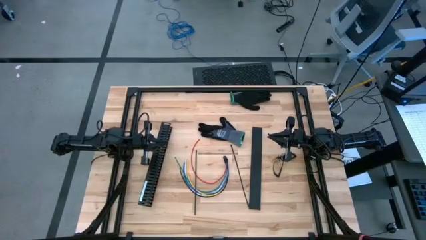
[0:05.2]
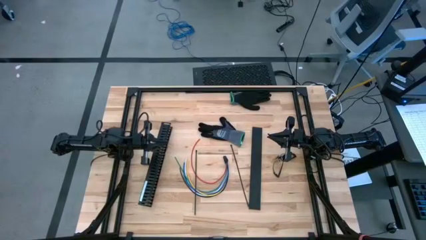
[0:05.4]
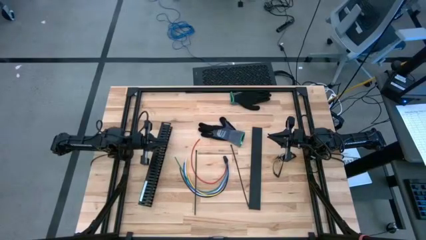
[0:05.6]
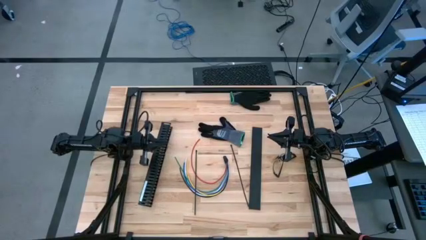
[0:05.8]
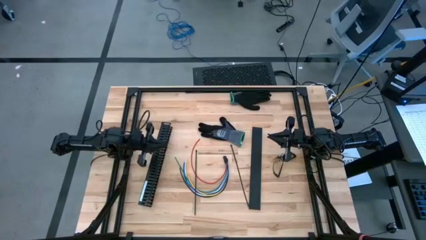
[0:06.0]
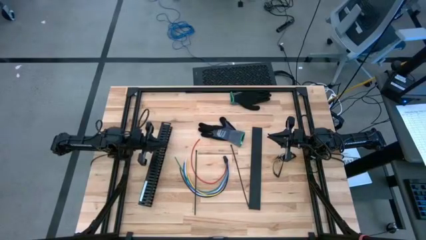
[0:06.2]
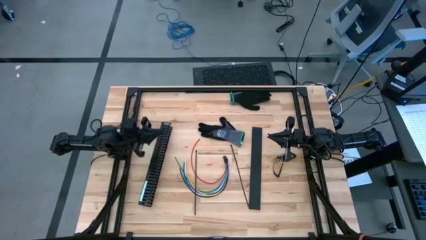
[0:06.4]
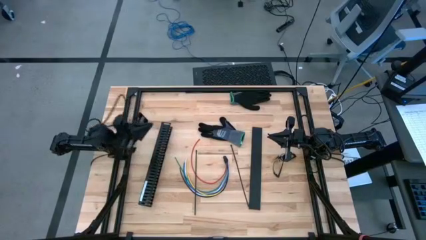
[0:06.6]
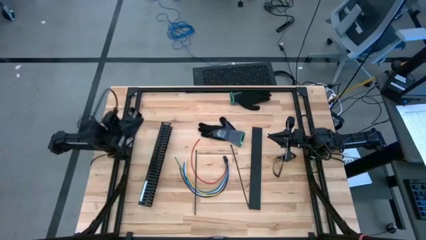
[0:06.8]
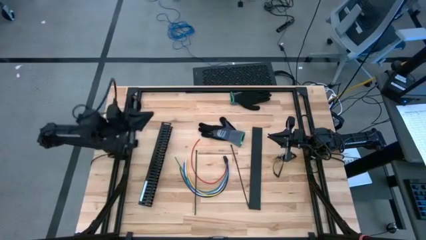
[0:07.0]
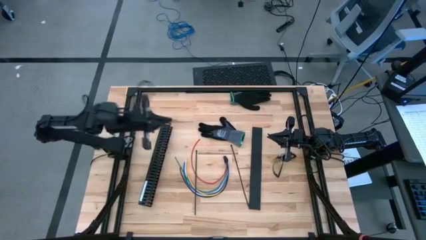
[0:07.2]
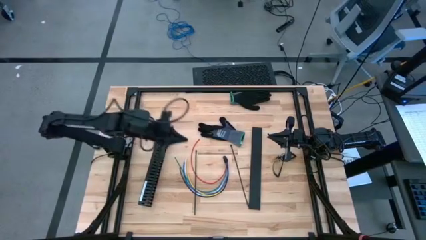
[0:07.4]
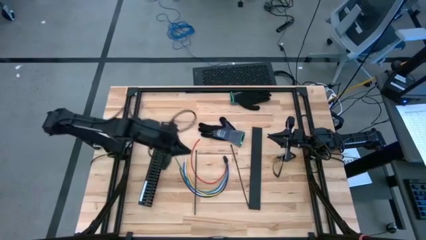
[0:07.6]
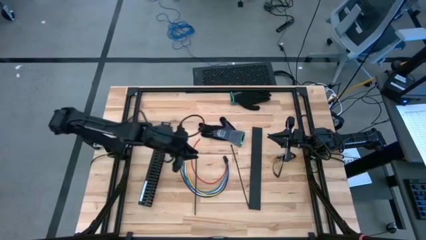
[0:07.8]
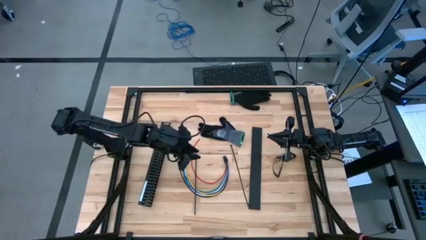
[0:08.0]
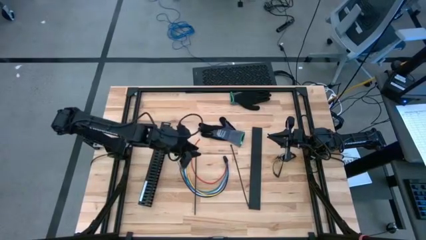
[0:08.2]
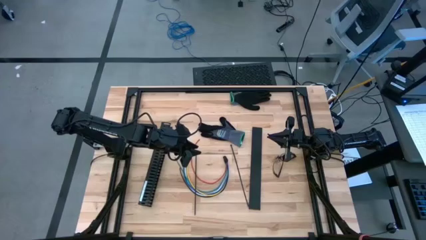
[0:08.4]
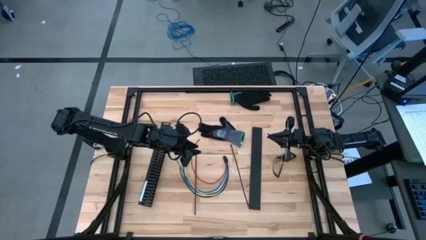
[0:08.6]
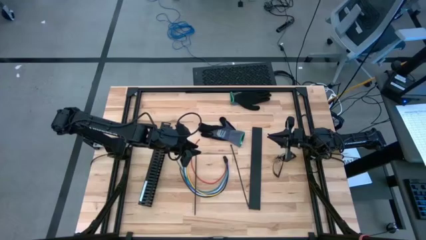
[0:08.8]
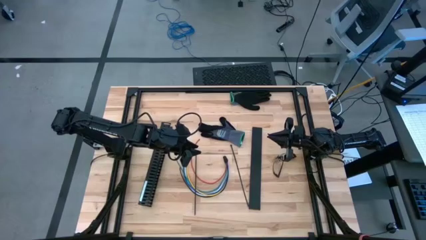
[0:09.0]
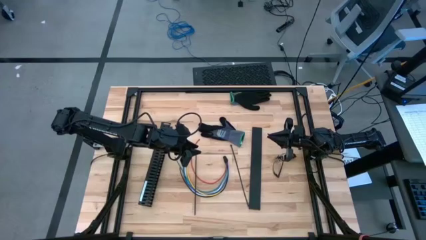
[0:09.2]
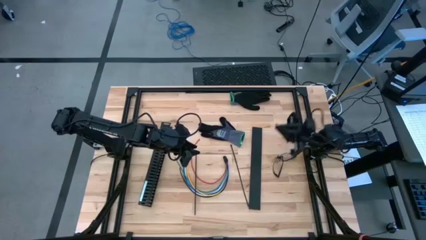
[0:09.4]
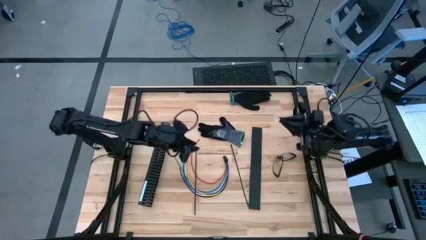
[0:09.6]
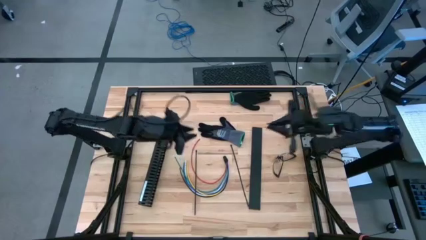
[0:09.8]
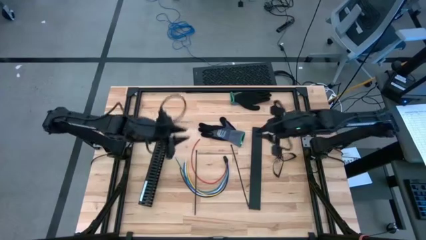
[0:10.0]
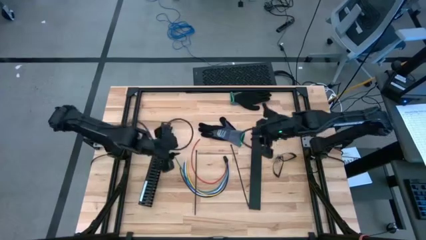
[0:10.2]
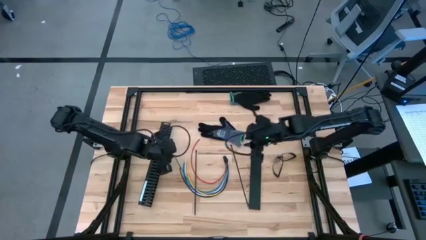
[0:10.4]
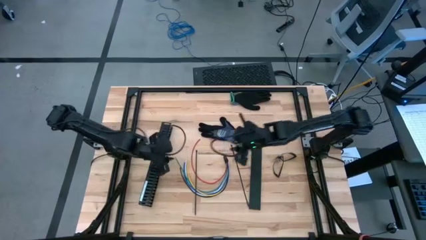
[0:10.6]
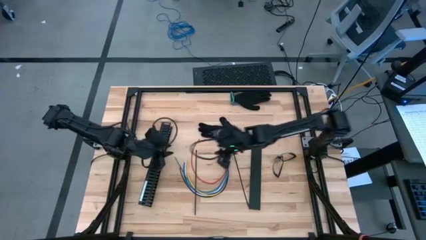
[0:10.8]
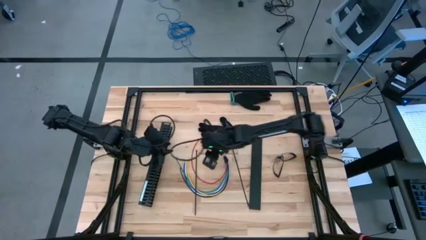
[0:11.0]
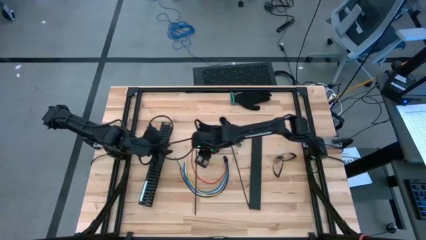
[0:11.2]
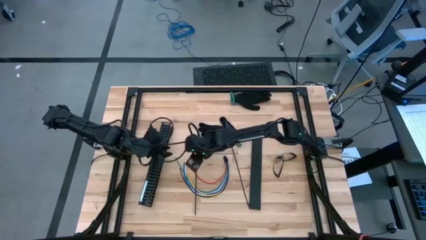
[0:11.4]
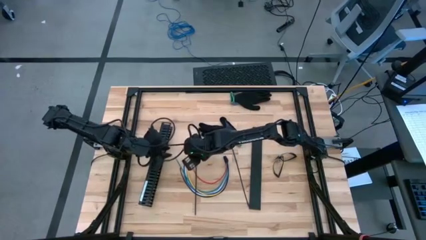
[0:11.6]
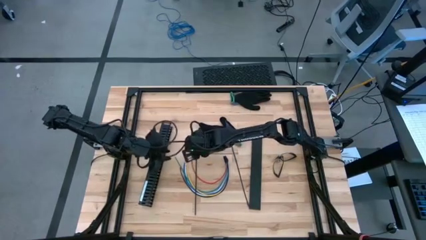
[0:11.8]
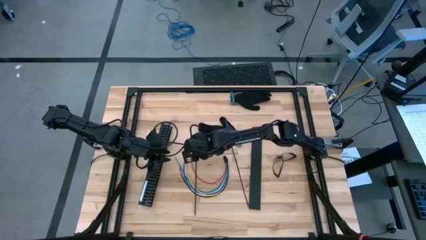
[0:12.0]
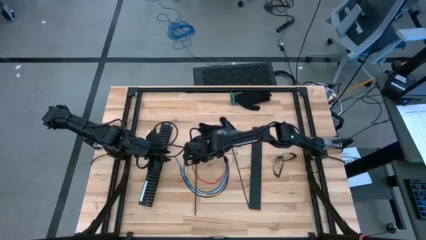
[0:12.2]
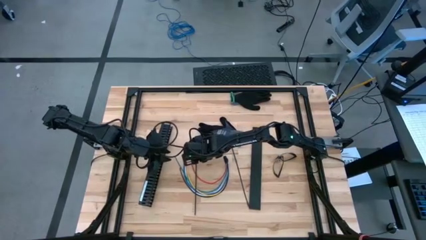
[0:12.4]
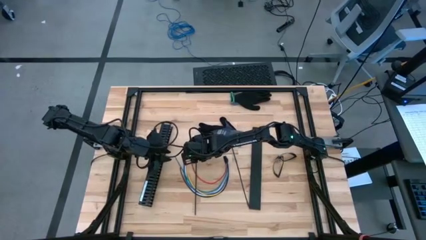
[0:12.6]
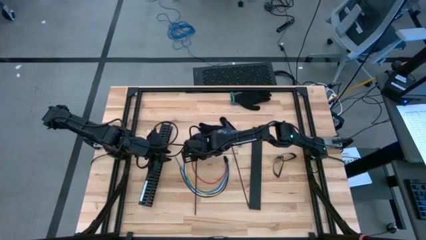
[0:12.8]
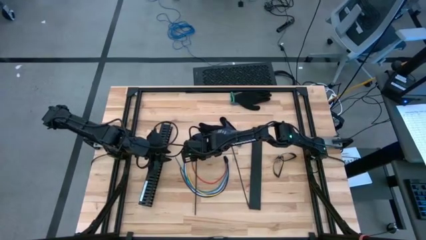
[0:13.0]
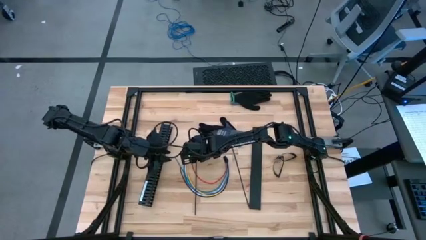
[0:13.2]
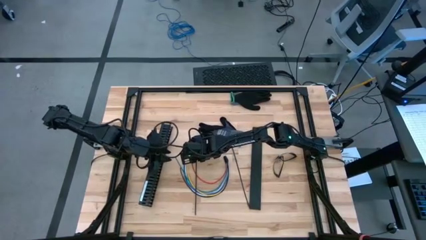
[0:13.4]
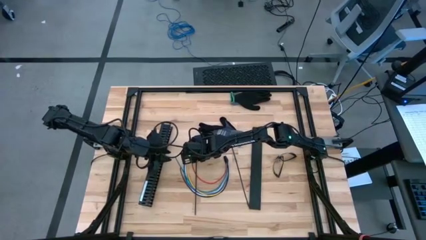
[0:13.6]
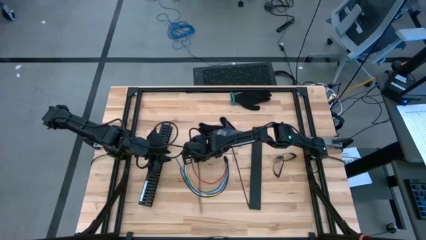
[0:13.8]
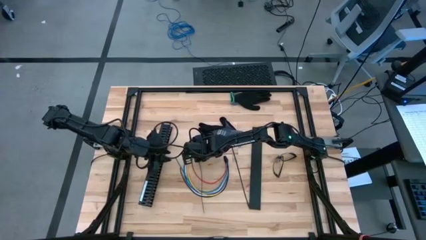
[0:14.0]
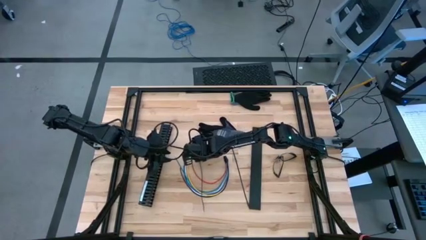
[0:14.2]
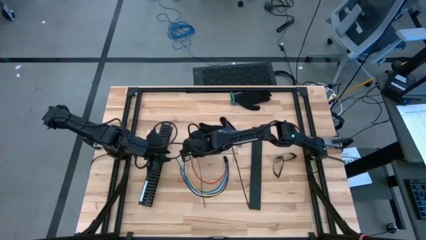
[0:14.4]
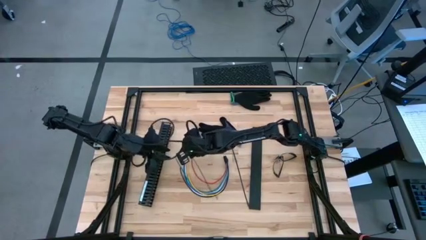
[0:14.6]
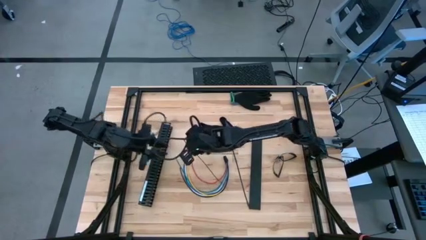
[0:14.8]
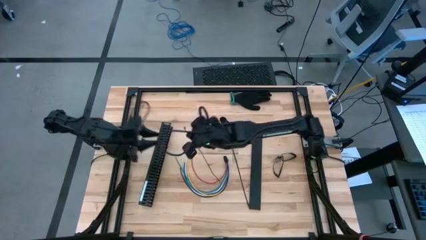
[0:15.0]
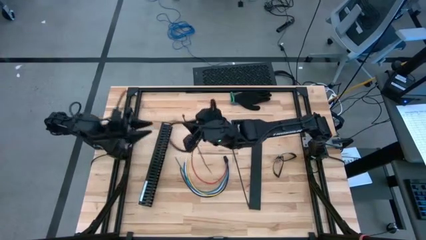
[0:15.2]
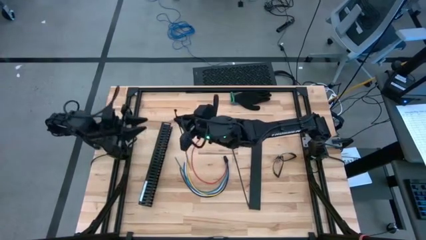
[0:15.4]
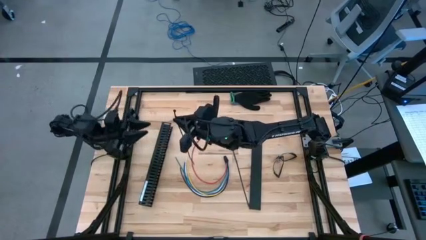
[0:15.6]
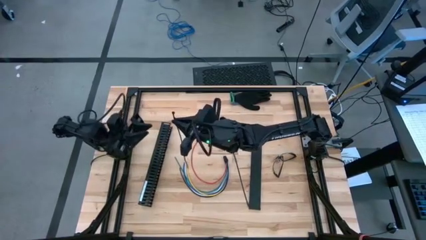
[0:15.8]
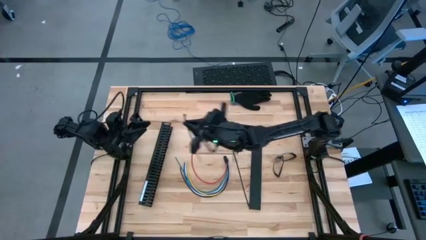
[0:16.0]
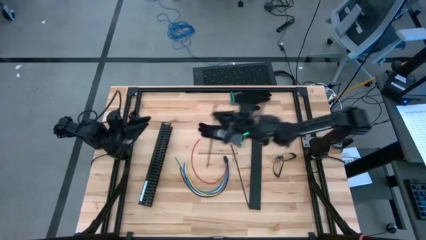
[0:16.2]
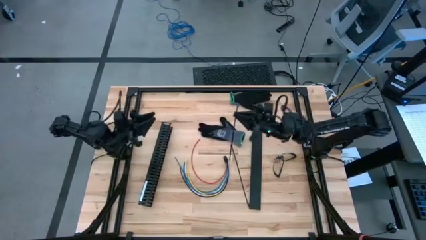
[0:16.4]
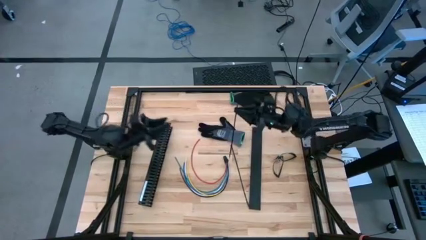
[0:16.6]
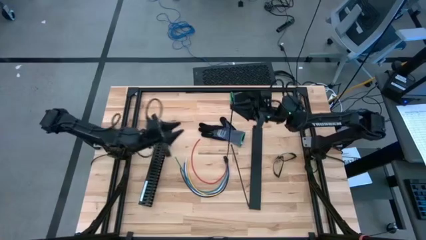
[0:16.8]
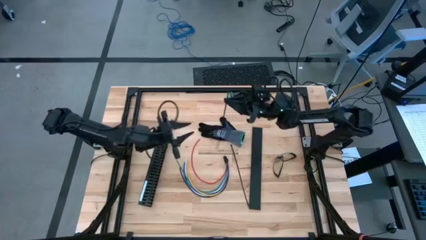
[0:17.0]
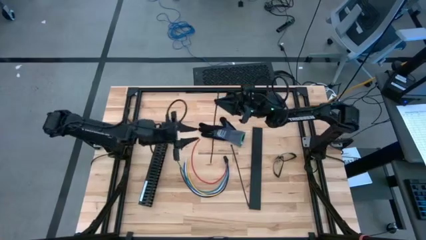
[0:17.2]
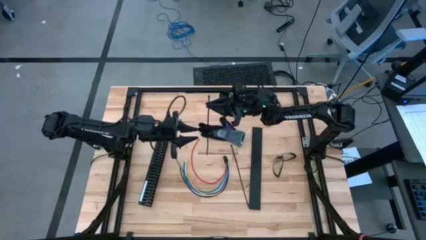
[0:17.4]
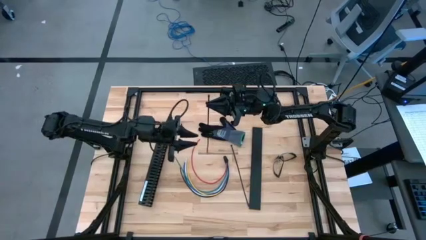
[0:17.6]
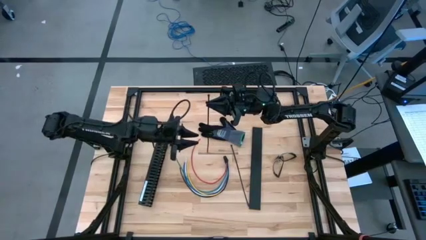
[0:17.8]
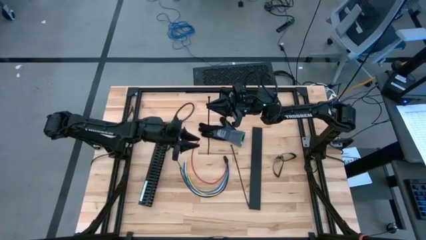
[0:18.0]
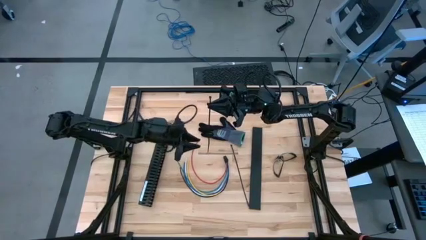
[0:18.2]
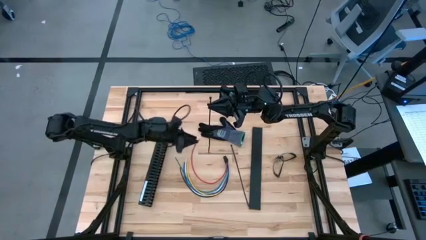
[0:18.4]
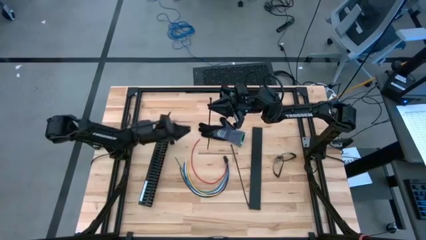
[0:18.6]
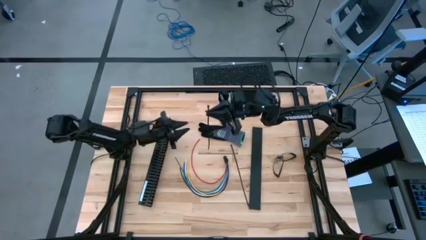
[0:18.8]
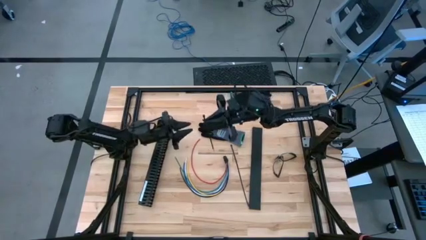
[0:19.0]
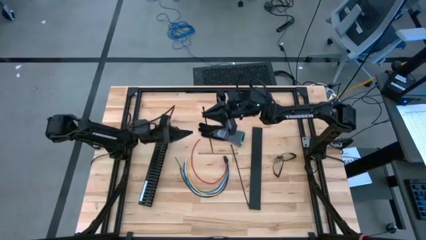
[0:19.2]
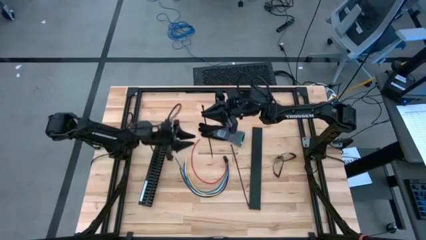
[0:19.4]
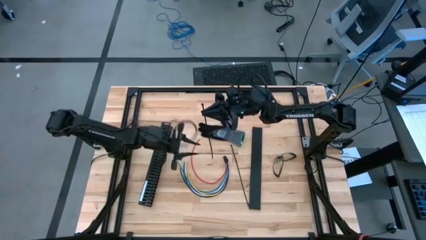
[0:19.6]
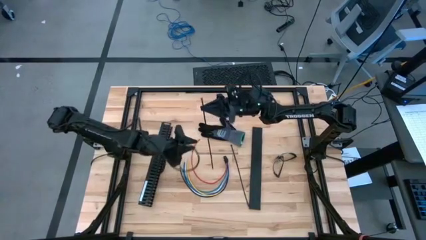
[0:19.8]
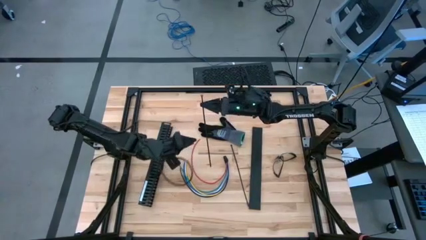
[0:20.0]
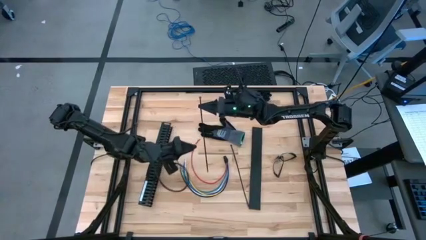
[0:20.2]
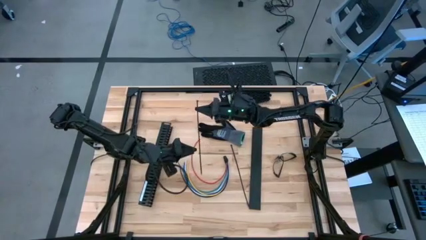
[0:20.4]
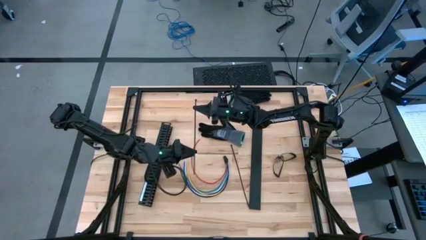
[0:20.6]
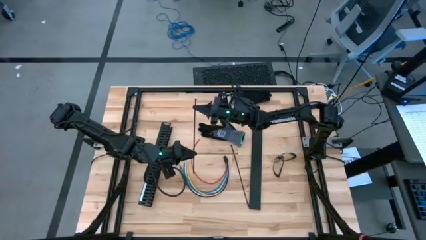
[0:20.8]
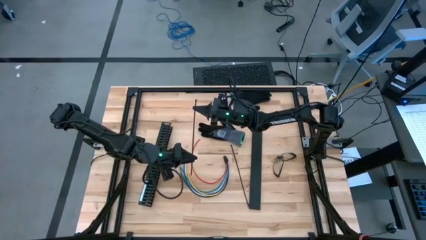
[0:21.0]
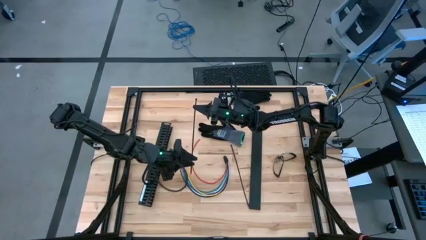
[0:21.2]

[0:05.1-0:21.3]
Task: Ziptie cables
Prepare the black zip tie
